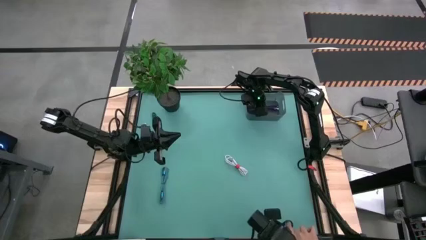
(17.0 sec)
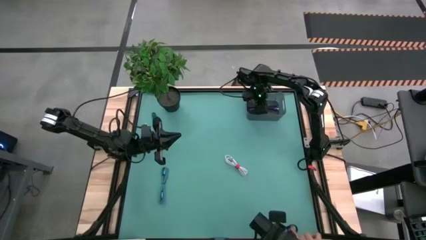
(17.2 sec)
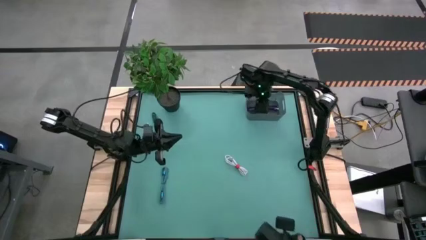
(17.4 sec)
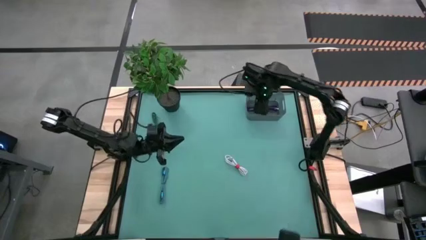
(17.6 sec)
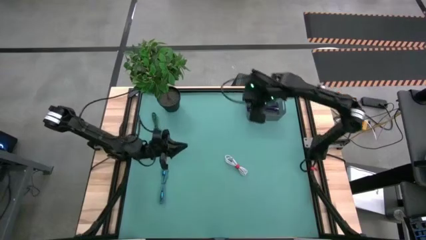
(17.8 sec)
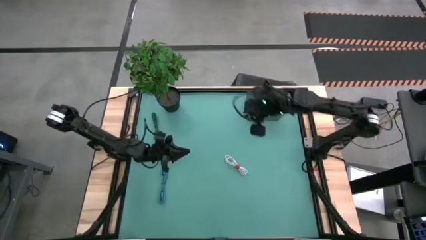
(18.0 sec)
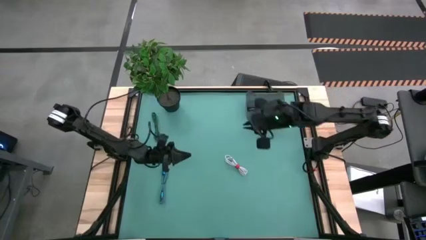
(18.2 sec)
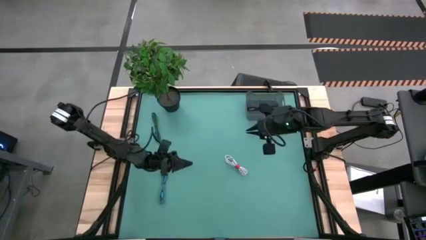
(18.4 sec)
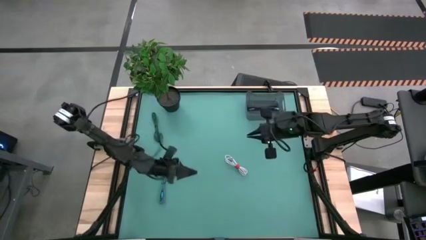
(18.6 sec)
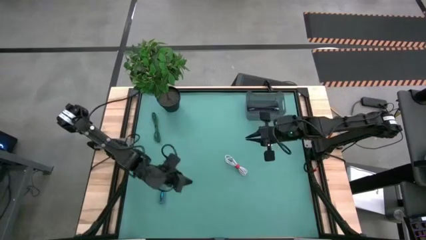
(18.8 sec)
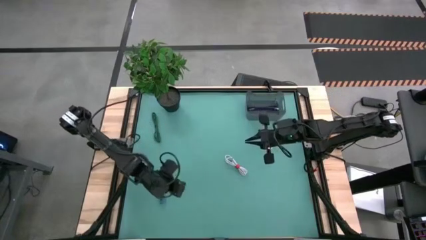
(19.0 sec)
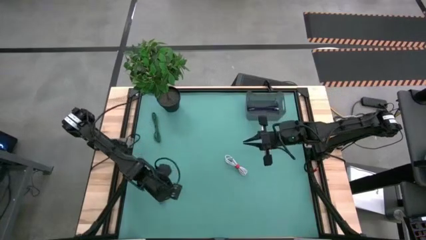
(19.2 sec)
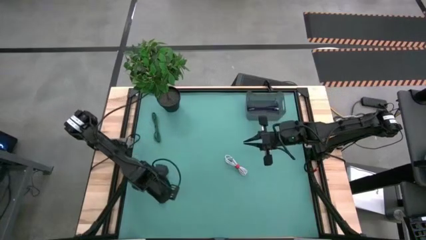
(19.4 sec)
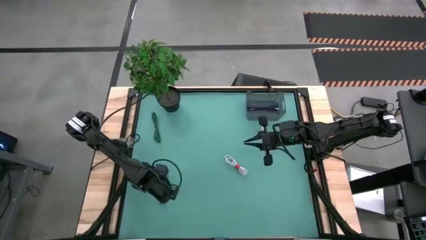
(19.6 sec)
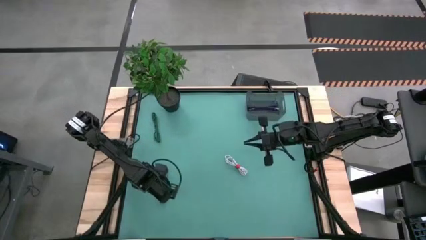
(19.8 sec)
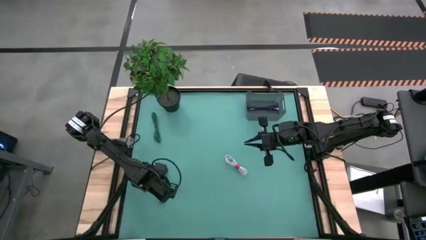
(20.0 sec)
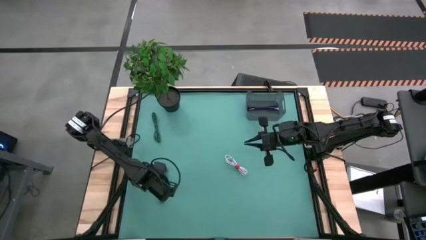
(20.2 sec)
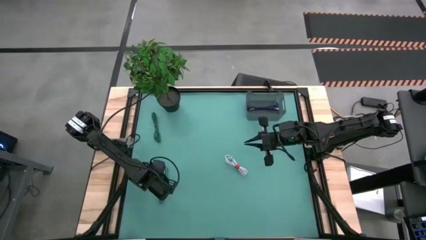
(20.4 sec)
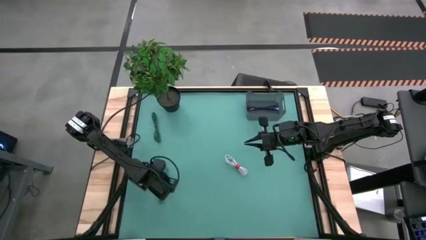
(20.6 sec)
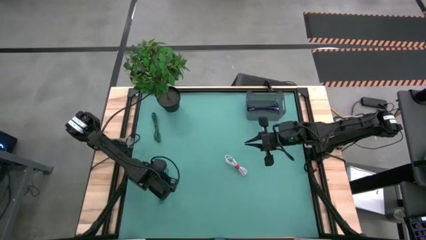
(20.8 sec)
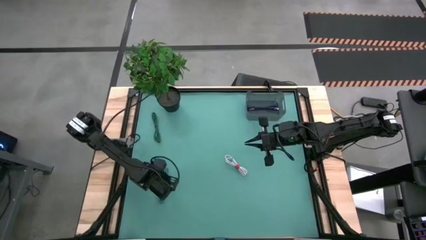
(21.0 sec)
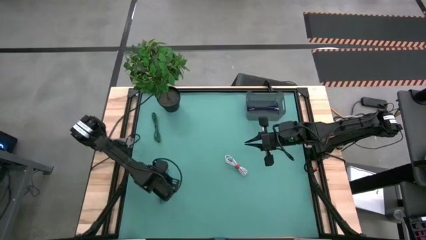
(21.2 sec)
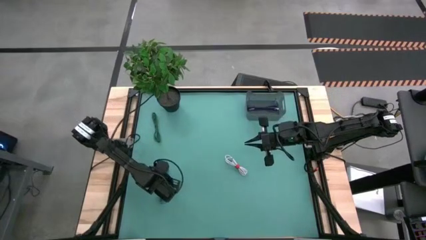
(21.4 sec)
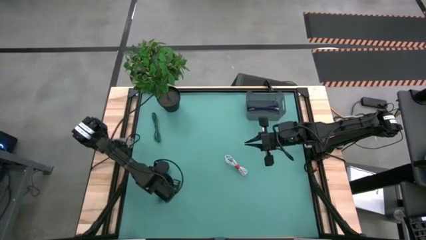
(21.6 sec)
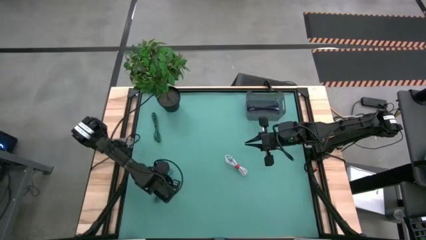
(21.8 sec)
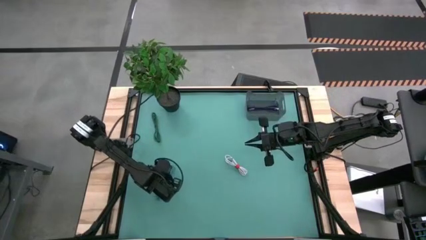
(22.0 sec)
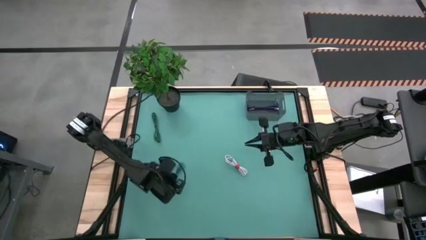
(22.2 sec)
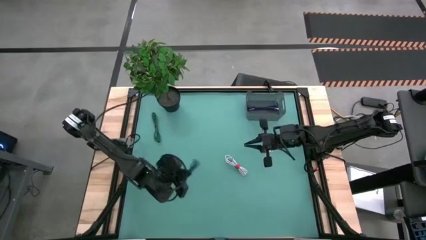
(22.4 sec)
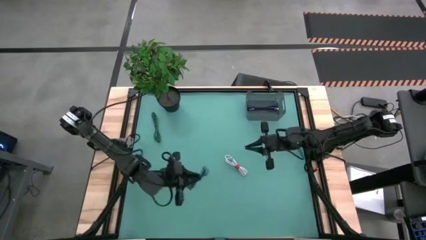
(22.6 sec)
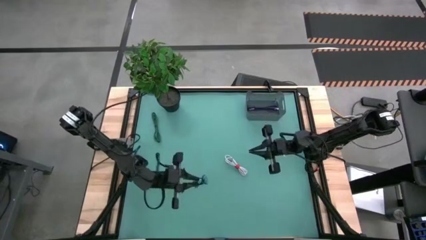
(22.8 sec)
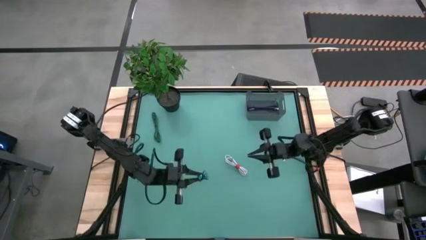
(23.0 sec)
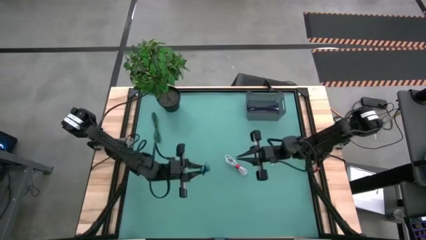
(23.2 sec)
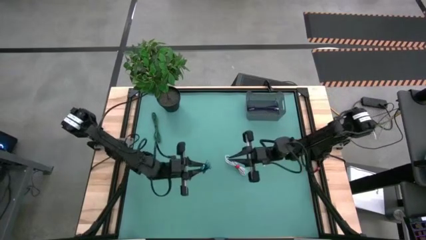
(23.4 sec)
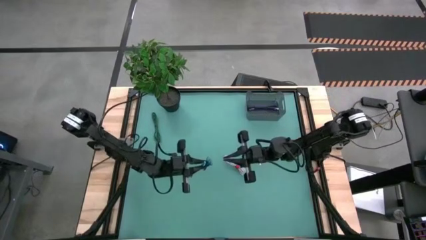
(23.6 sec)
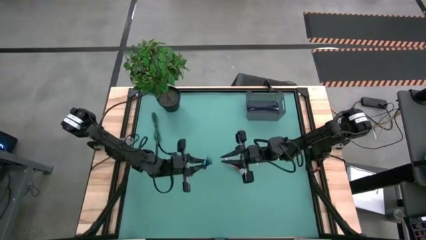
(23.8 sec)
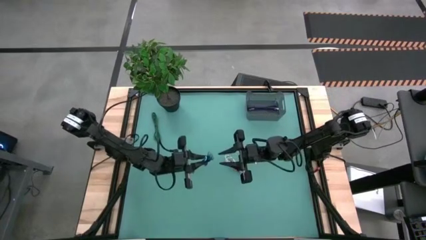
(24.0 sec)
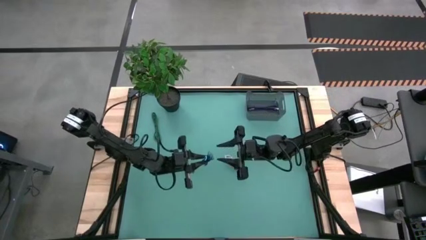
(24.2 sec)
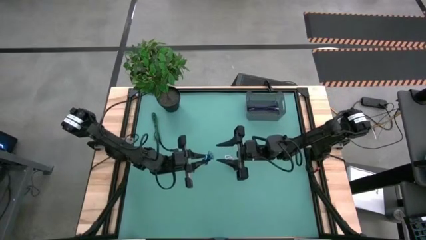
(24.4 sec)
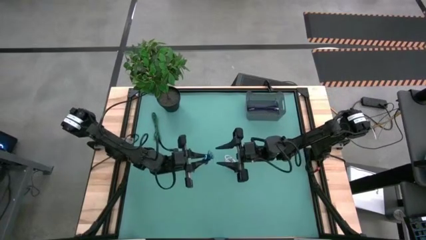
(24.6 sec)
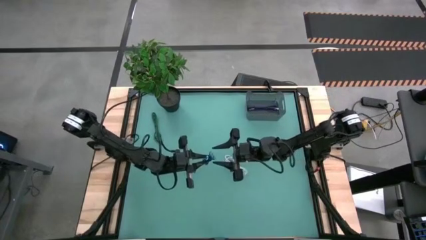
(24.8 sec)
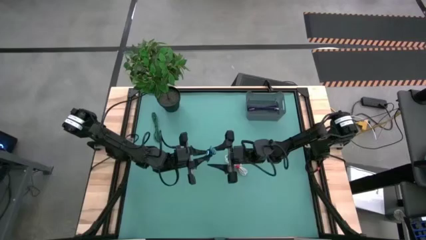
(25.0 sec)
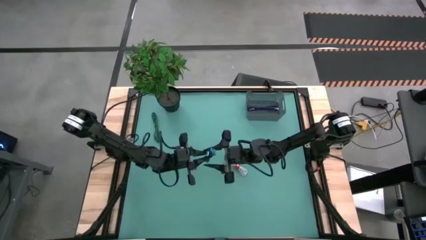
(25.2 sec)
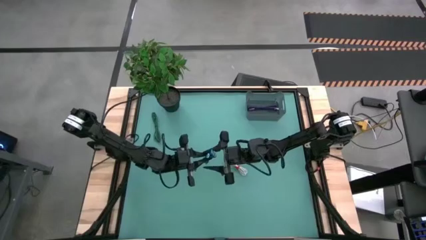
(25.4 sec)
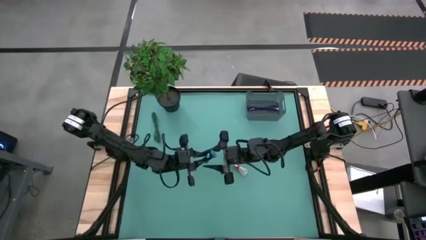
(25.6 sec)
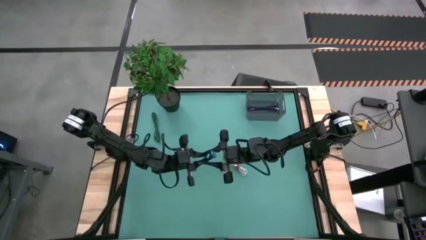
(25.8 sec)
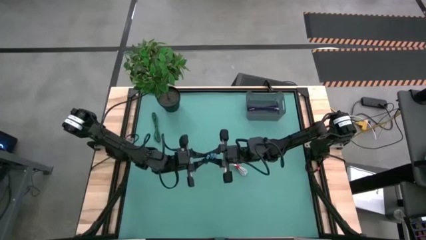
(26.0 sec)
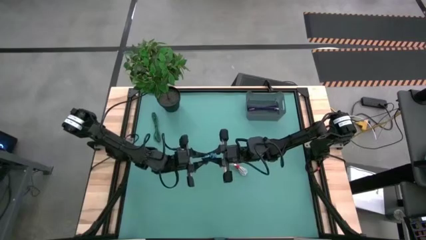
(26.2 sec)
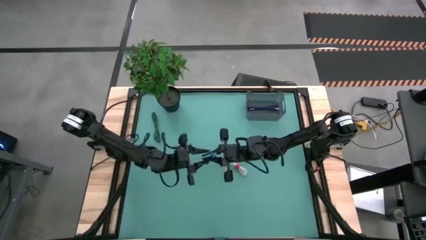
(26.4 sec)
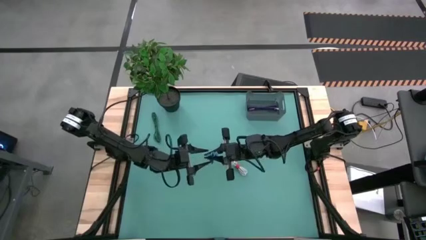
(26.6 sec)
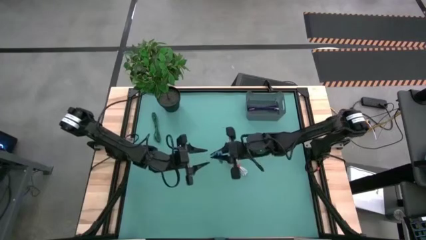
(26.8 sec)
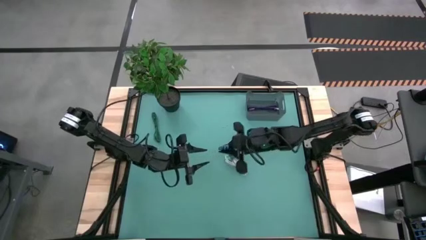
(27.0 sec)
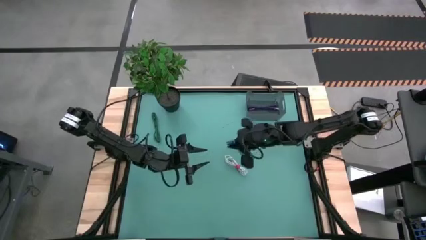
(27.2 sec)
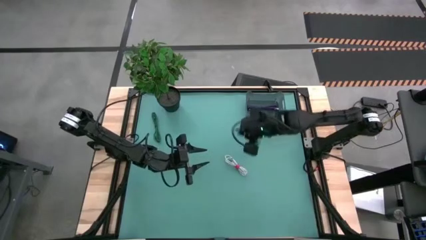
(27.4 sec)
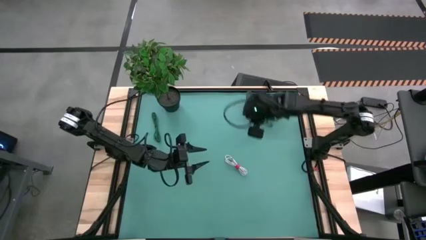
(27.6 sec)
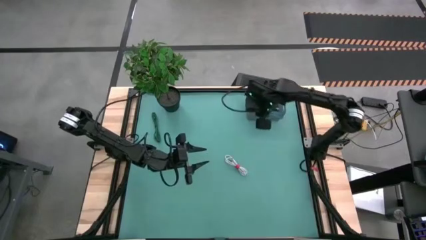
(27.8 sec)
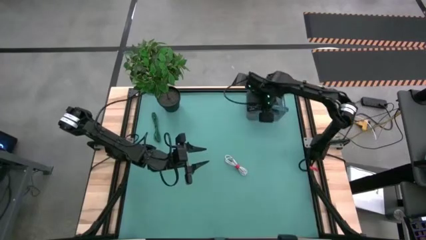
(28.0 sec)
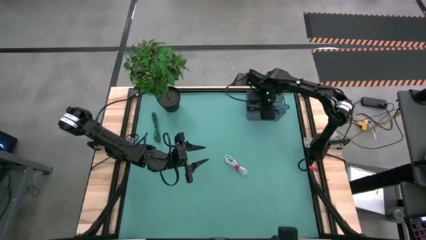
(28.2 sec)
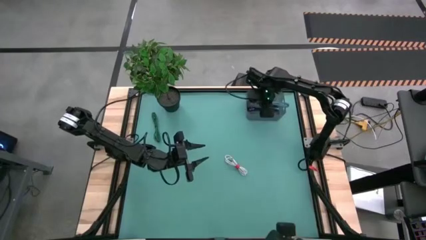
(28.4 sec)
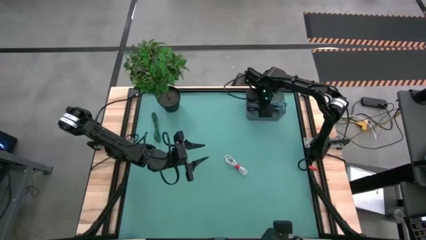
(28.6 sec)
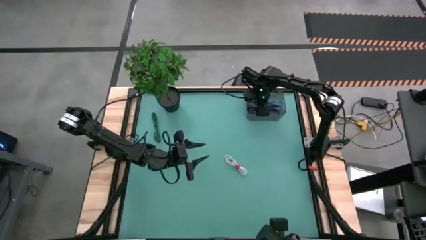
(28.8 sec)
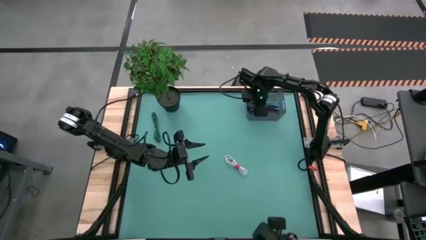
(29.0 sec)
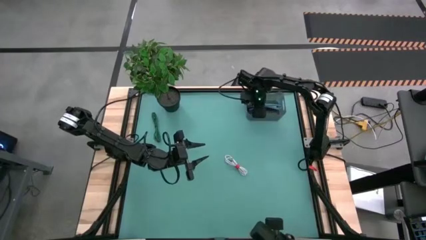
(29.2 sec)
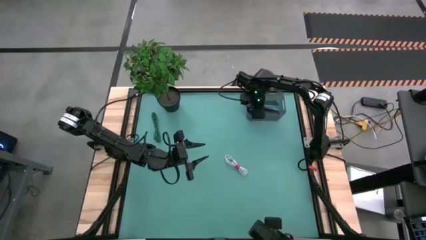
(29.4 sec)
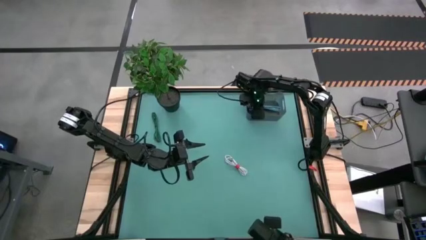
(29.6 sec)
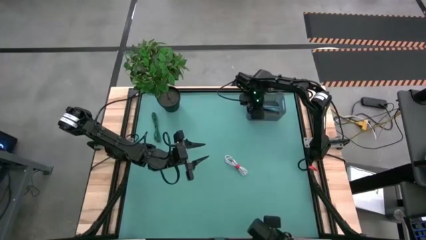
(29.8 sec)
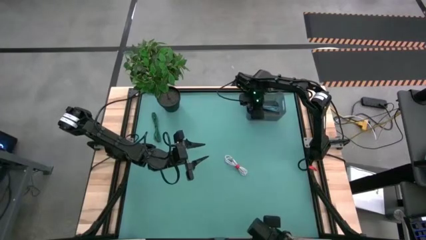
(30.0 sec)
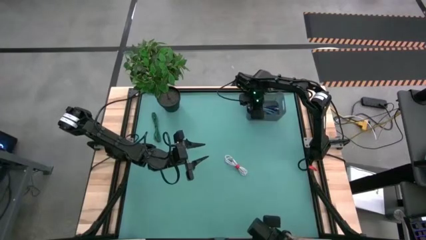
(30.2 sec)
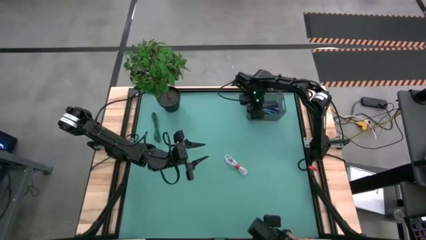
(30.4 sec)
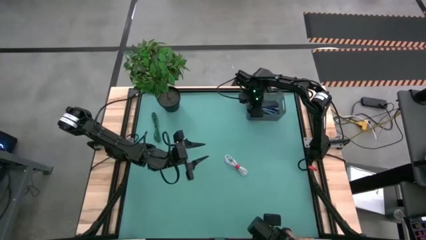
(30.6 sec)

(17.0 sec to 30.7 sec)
Task: Pick and place USB-C Cables
Put the blue charger cable into the bin
